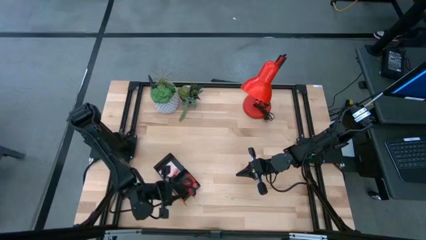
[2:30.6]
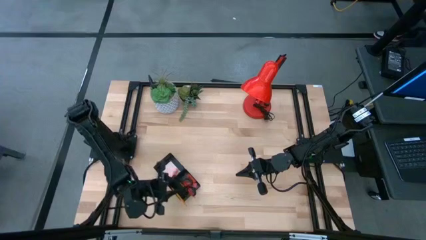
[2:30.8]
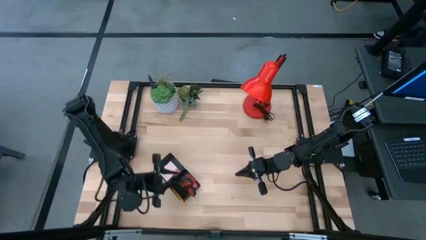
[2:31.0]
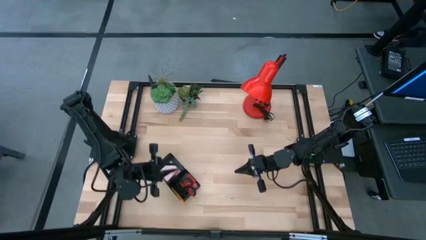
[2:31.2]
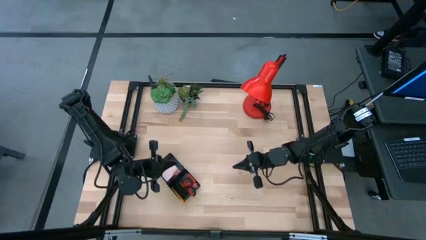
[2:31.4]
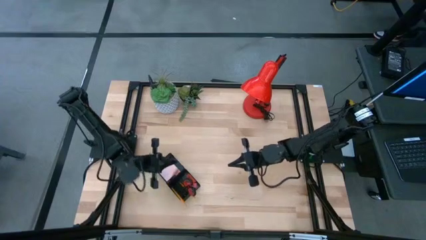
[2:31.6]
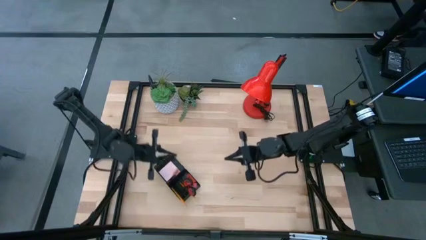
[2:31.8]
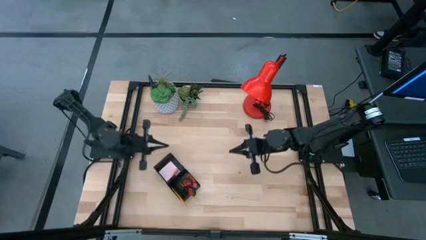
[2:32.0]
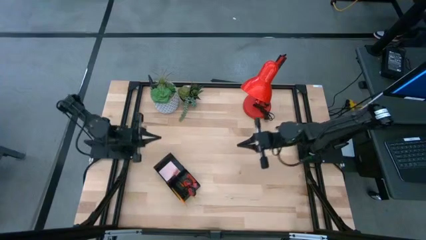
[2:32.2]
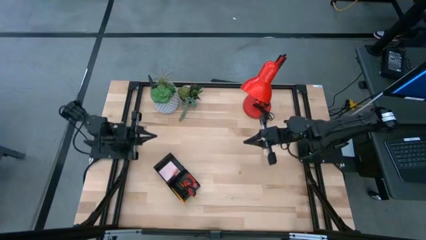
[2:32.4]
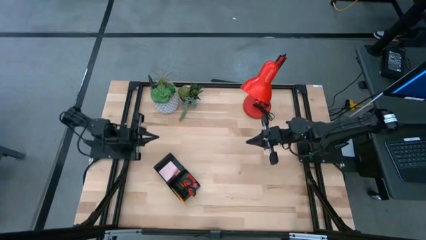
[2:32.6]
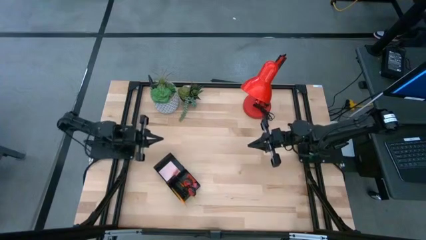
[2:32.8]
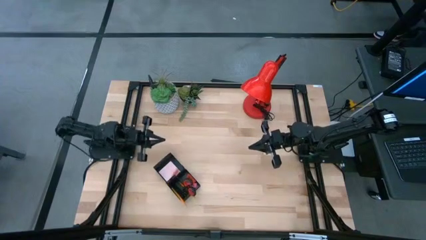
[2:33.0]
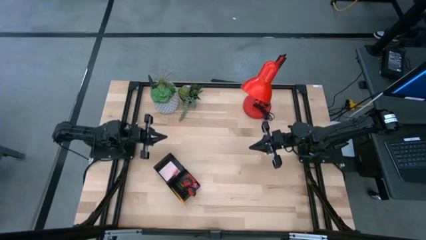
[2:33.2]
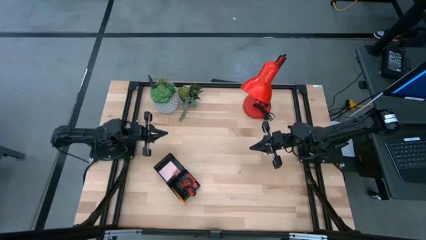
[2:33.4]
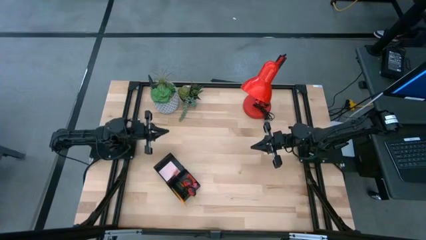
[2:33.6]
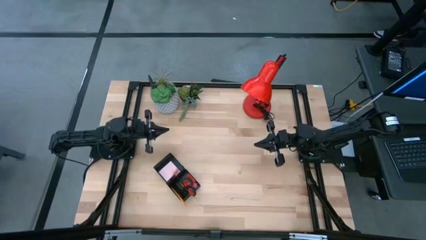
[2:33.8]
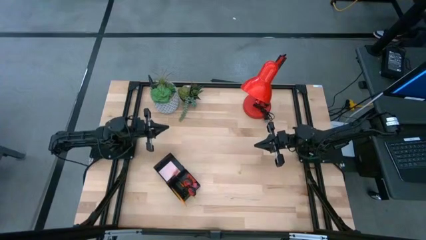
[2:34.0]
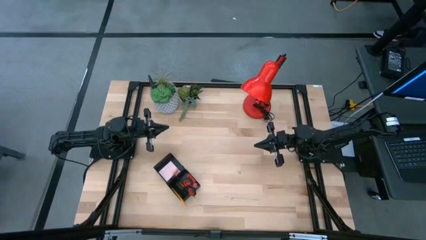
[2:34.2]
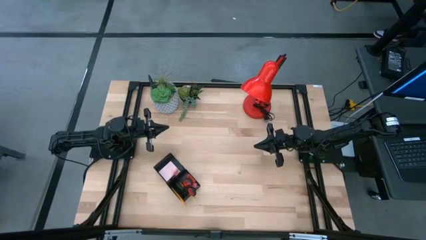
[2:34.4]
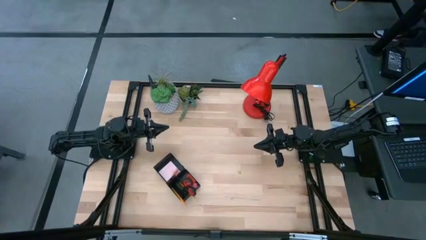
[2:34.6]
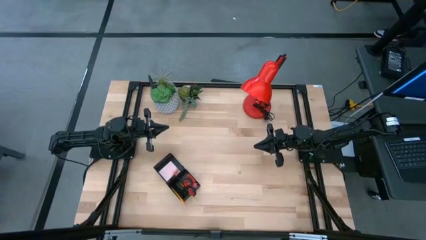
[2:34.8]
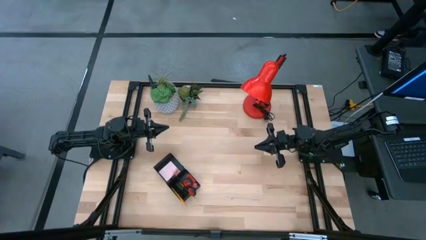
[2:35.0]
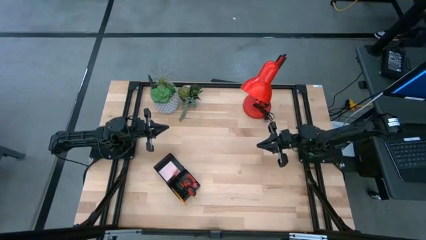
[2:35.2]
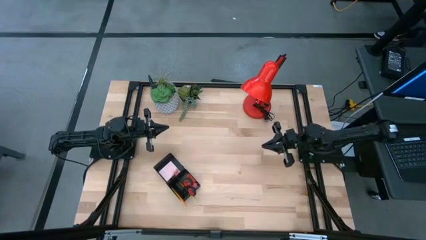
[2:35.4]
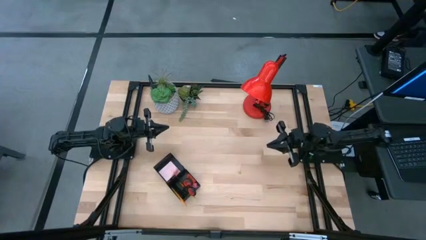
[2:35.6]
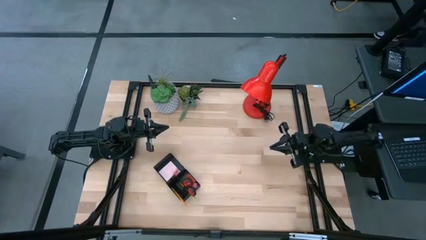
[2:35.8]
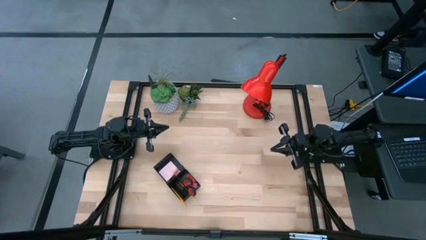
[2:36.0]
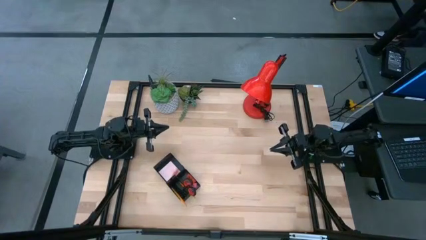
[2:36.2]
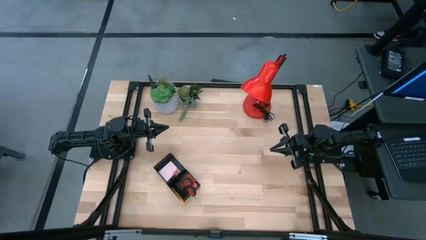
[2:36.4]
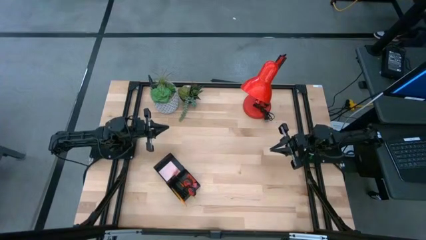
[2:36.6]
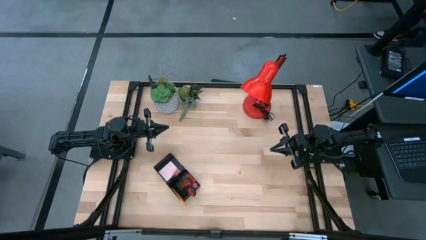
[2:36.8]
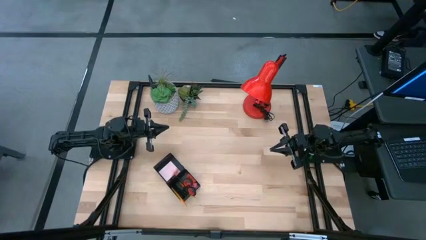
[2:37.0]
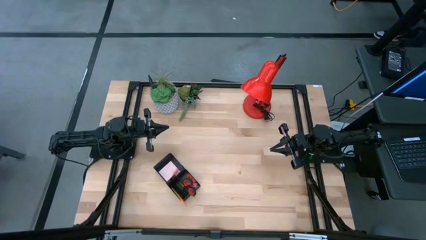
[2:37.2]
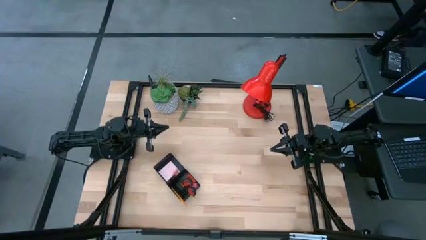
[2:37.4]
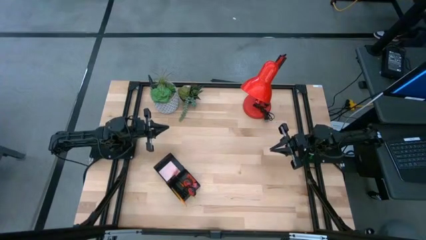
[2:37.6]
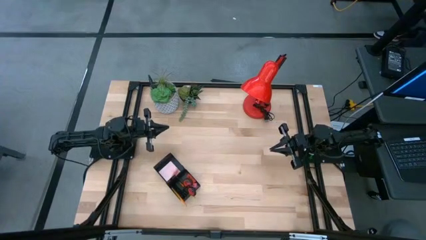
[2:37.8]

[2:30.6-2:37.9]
Task: Pick and place office supplies into organizer
Return to Home Position

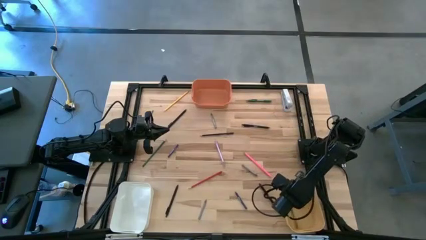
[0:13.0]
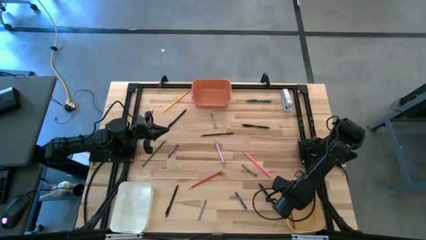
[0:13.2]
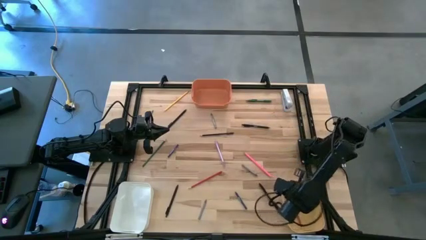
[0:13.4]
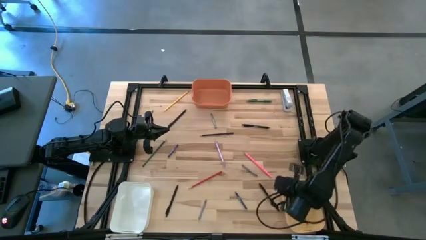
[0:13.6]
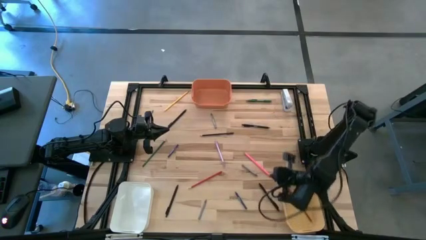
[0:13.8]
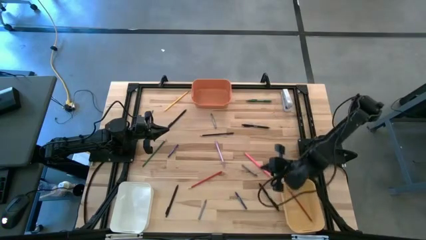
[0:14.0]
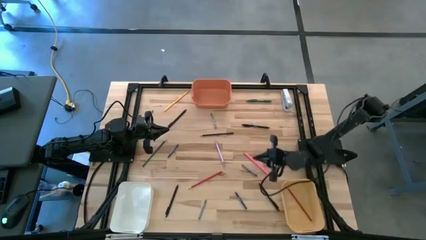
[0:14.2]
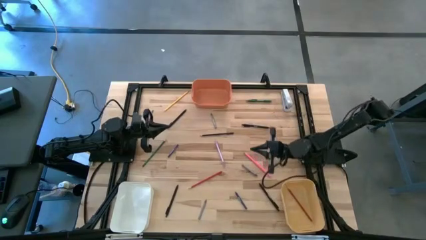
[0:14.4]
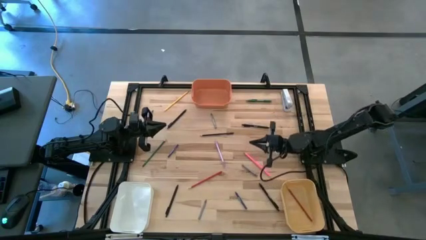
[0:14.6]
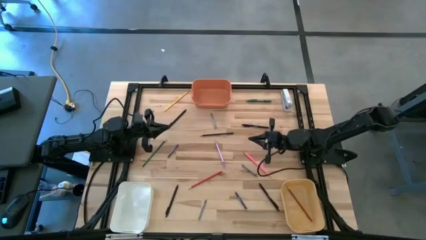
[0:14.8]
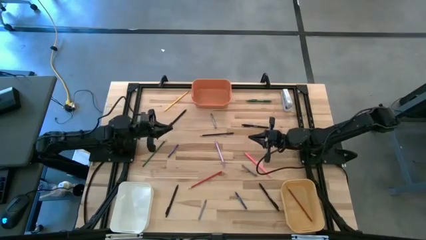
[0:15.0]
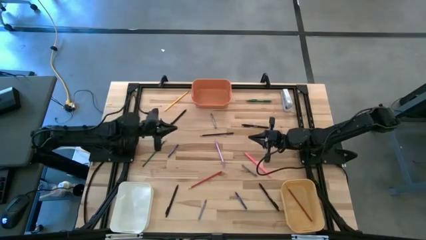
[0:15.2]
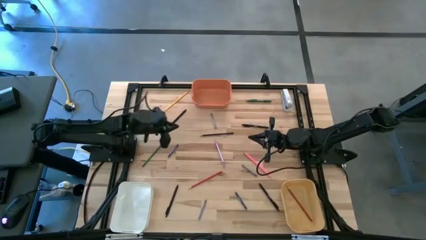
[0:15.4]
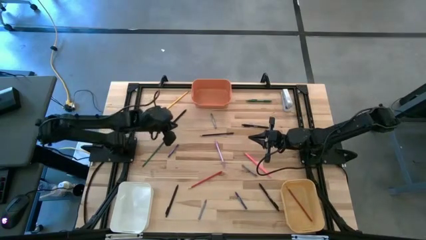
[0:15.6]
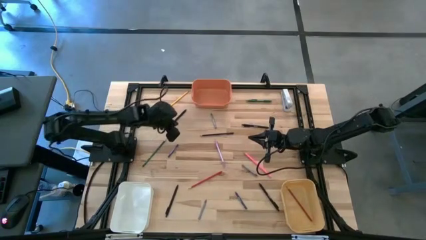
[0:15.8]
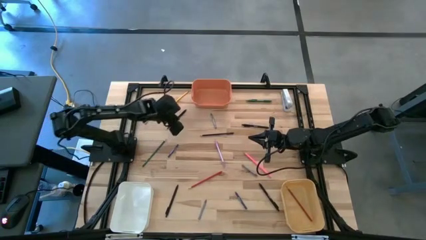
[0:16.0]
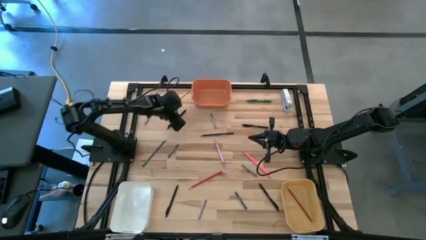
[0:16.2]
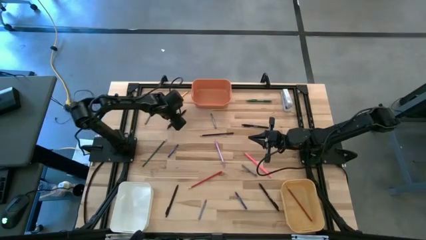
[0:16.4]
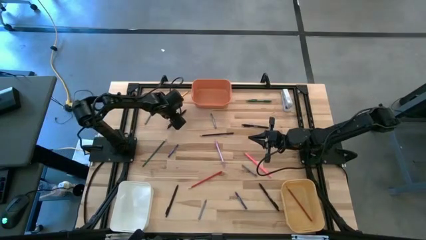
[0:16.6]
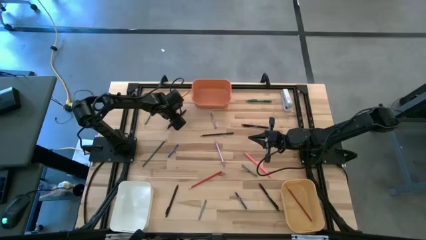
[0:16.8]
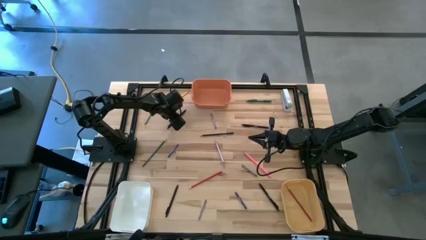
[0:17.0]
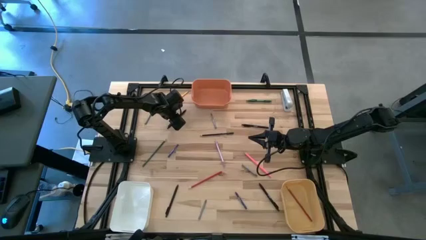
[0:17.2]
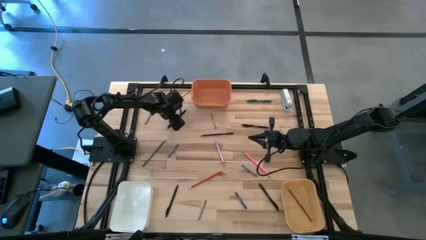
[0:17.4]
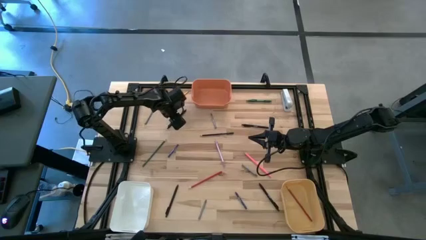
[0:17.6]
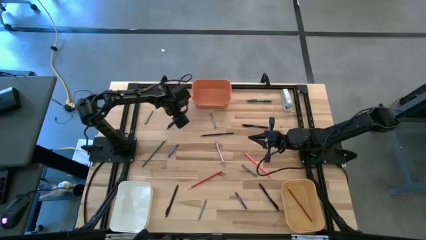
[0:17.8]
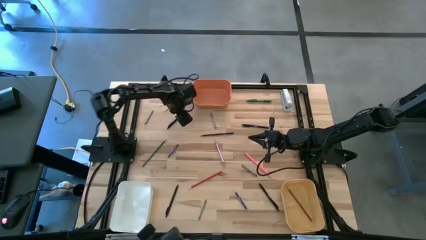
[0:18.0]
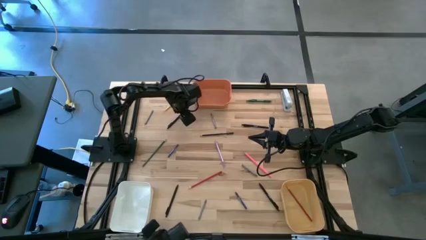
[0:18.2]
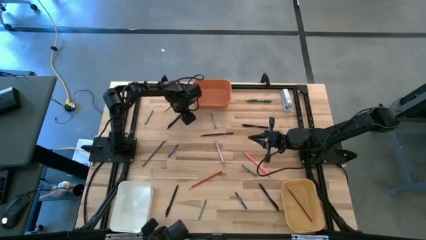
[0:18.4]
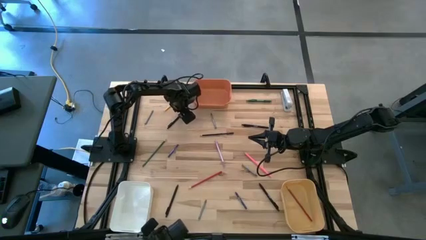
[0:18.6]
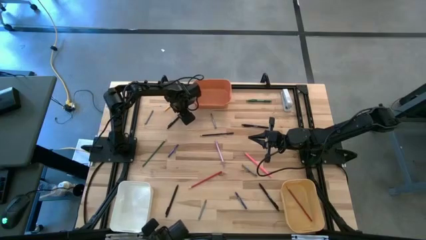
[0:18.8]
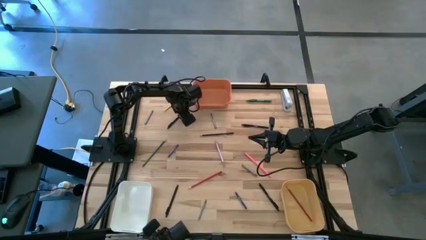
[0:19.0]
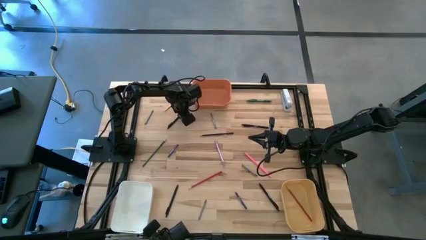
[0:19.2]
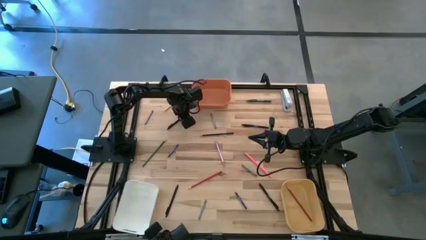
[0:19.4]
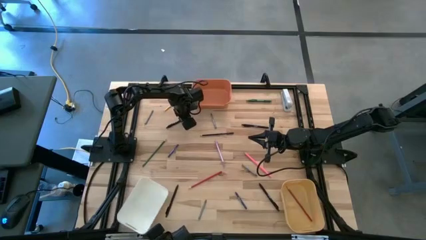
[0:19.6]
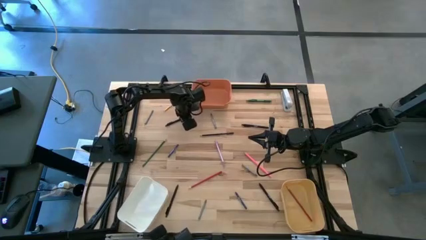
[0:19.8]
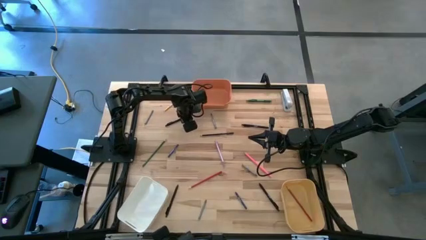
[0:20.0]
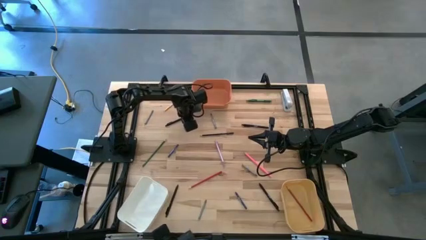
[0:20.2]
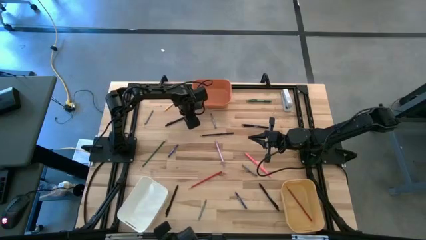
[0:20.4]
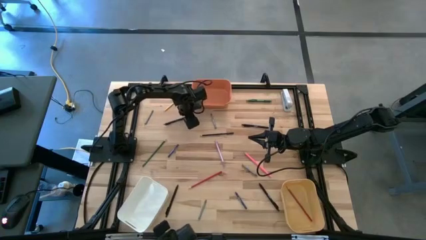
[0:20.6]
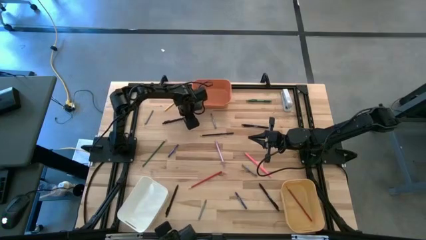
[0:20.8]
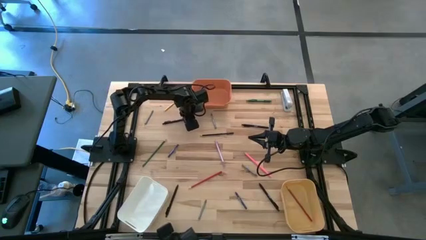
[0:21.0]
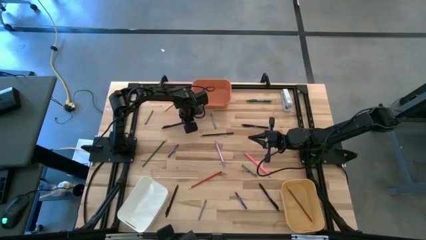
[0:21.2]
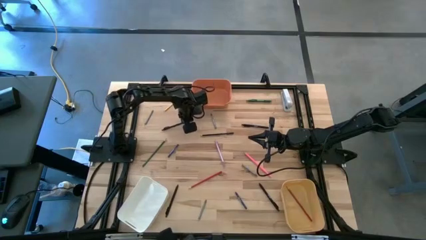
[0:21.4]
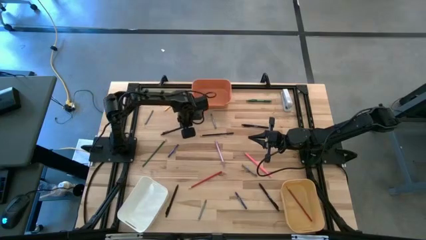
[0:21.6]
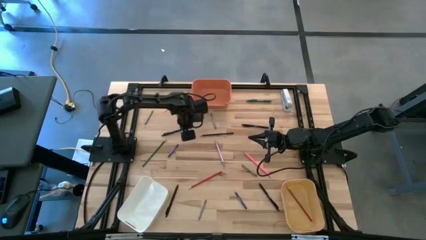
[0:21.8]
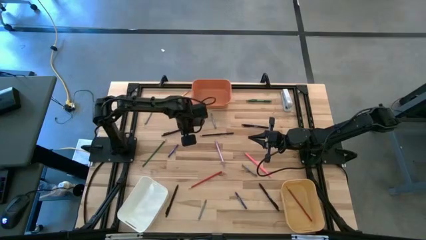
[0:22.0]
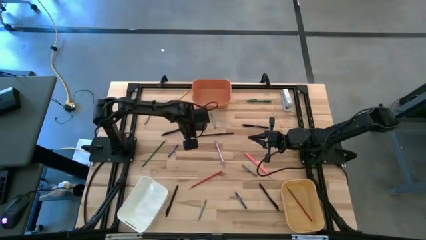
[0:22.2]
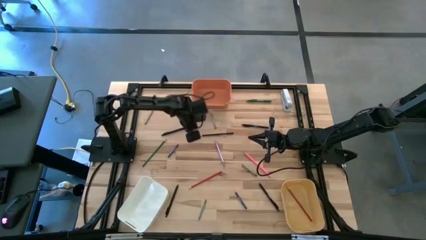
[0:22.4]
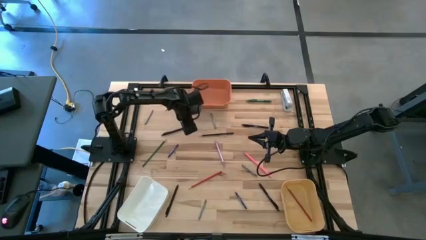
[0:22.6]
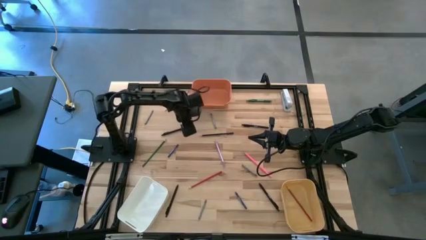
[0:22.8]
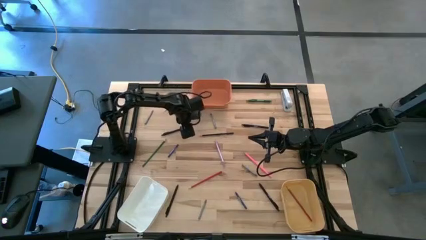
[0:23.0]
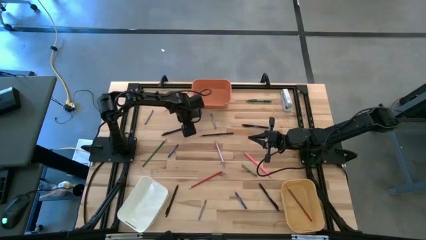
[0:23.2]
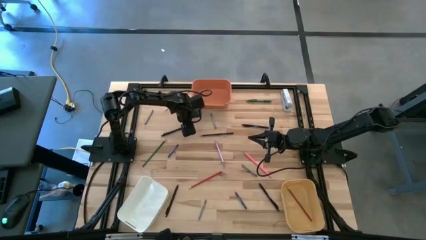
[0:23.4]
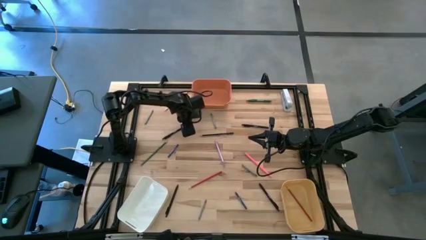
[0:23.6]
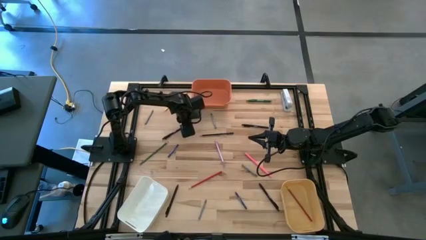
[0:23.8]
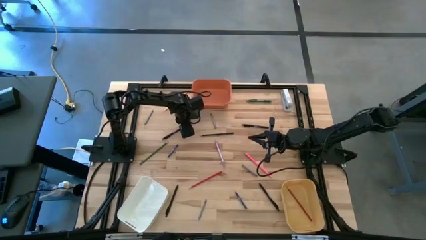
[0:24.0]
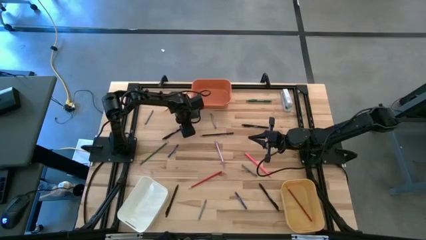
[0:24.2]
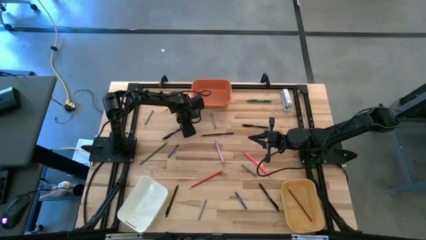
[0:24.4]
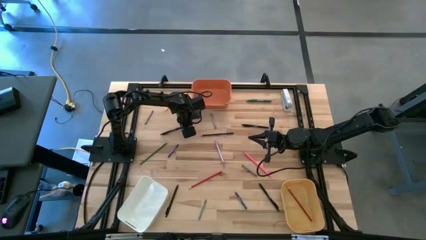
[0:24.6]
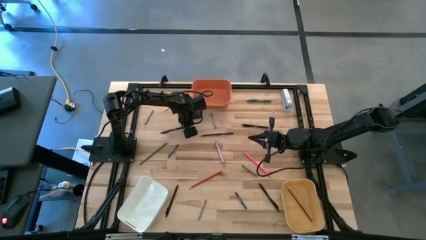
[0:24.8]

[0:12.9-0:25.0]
Task: Sort crayons/erasers/pens/pencils in bins
Put the black pen into the white bin
